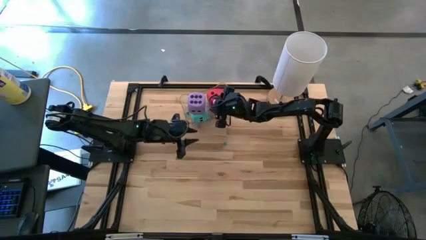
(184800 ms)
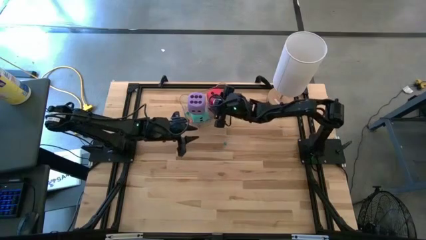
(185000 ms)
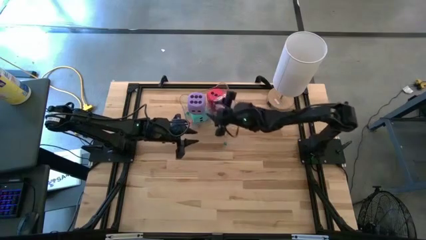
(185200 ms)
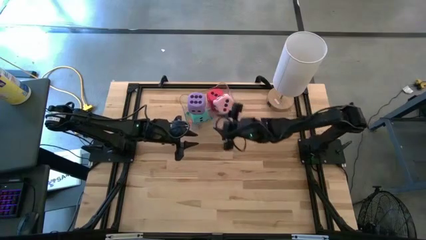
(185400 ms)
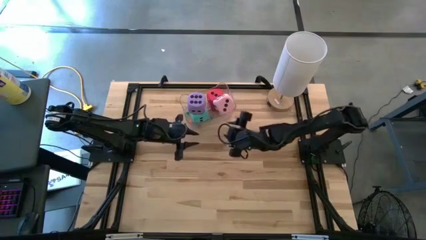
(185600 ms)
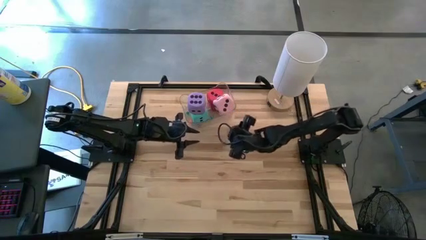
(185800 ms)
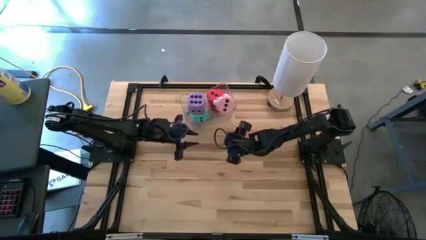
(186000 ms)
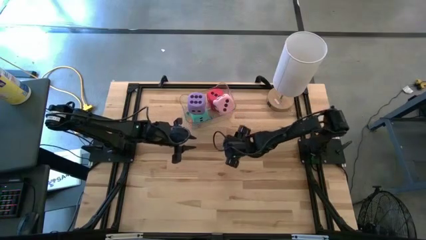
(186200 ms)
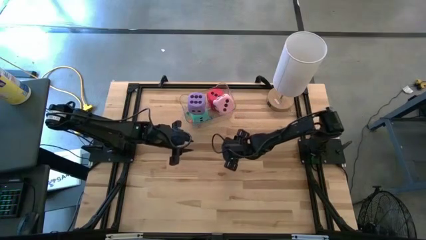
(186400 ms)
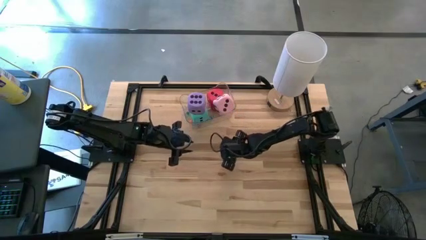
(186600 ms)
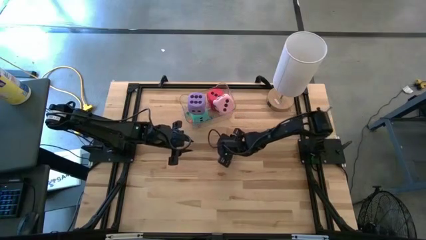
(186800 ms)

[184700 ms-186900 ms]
Task: Pick & Place Dice
Put the small light blue dice in the transparent bin

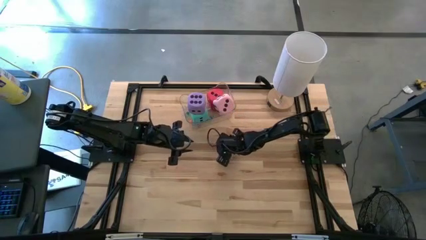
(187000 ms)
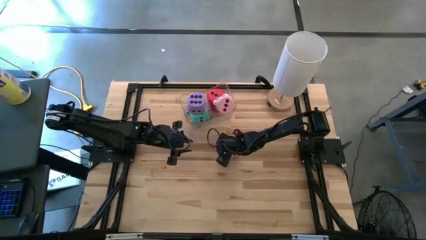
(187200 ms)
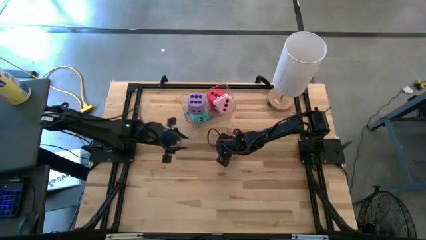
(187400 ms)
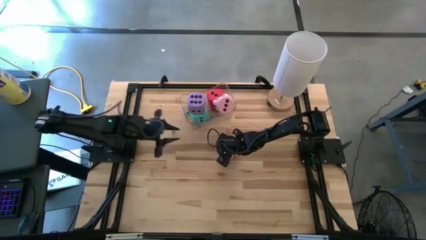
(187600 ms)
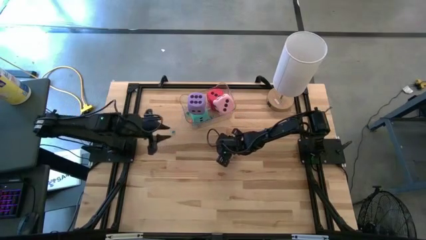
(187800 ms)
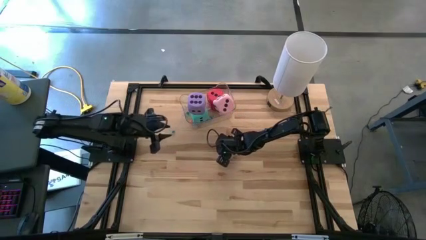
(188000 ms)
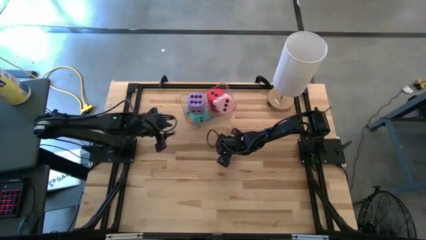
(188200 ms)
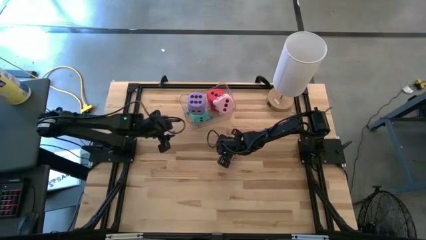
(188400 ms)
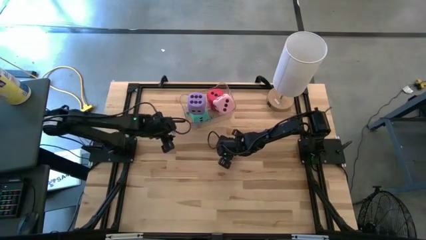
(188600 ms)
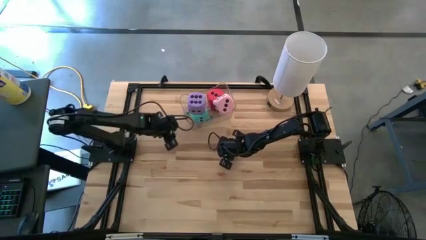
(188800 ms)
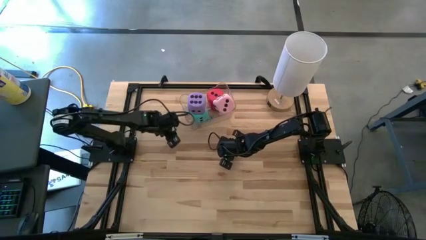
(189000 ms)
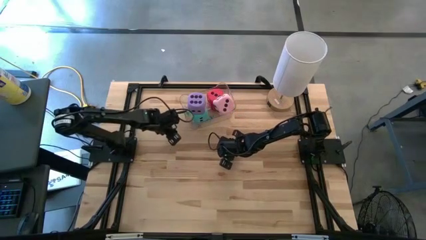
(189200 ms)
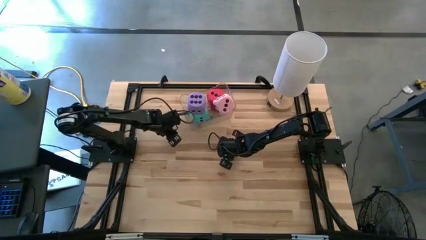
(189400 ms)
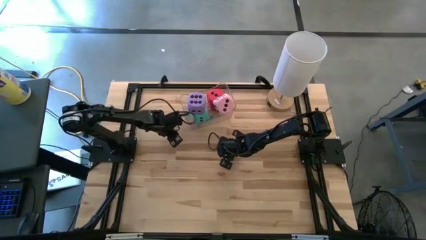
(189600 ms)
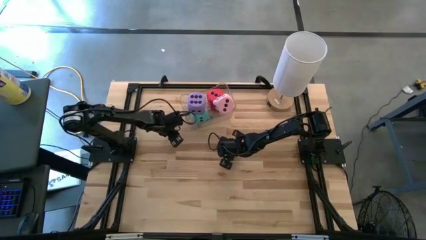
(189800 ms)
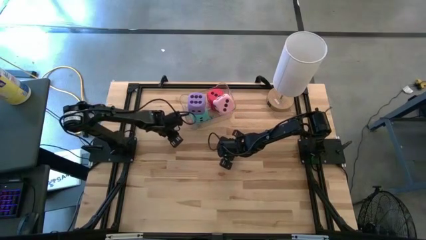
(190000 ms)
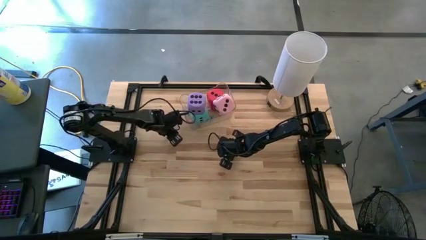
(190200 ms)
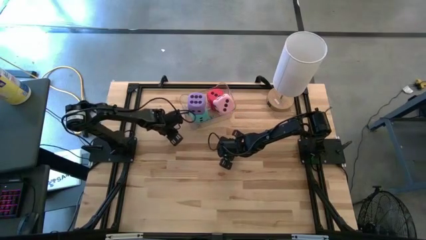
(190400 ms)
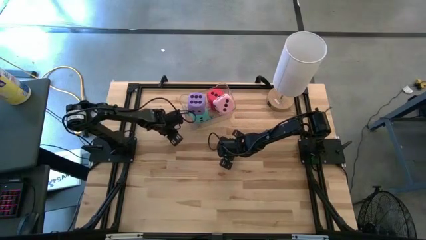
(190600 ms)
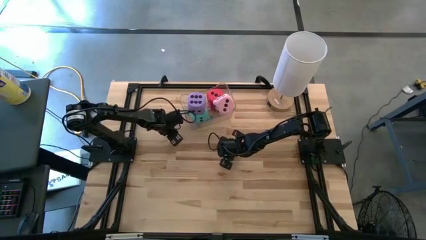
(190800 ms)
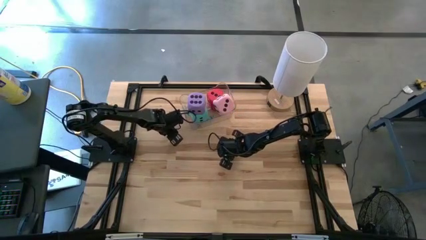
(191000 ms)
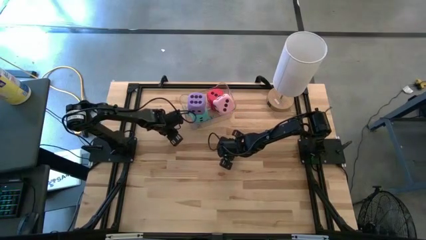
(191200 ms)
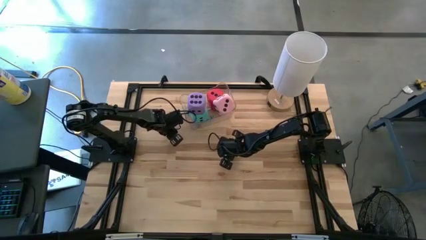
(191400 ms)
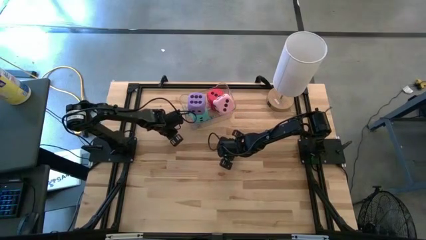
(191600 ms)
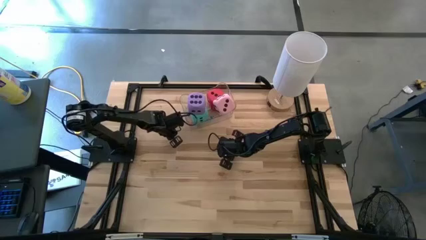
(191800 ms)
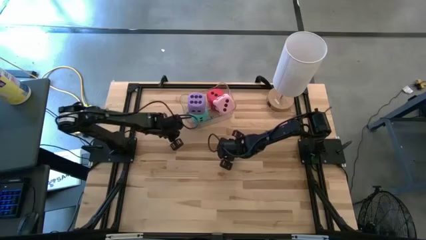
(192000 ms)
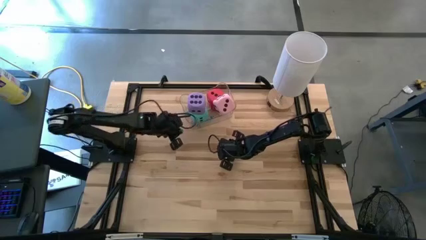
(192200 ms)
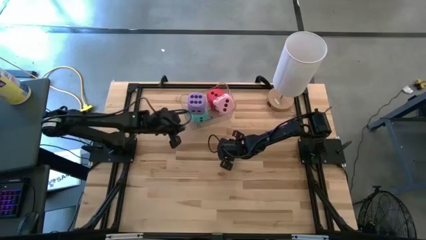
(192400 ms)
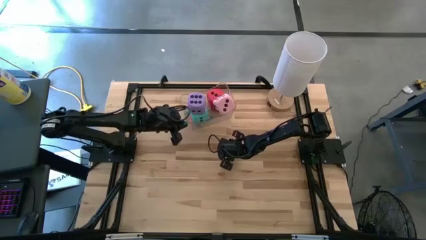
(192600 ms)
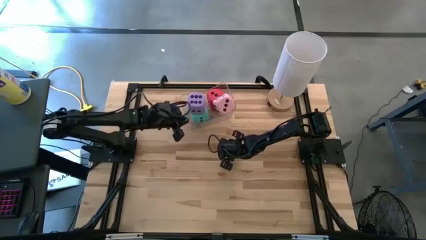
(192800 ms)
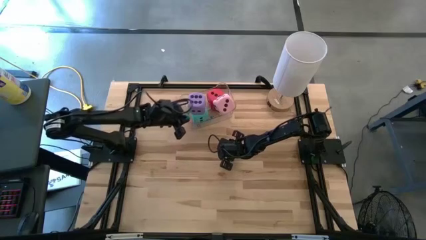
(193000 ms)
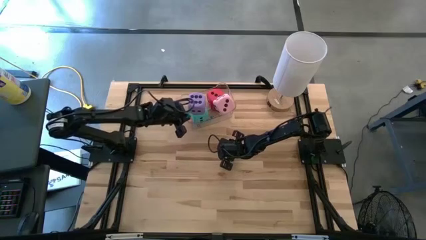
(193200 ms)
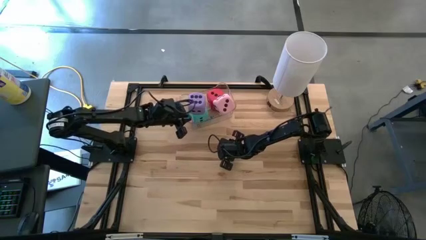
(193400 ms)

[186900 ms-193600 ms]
Put the small light blue dice in the transparent bin

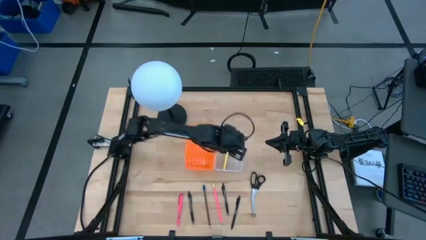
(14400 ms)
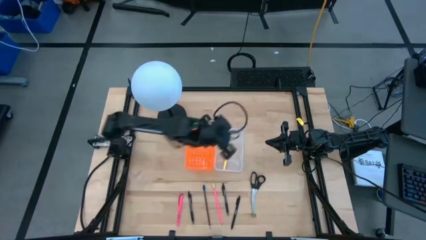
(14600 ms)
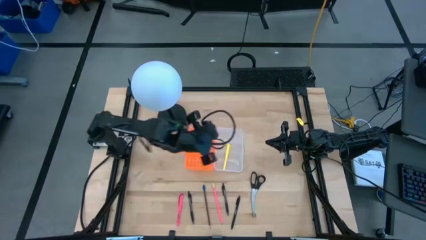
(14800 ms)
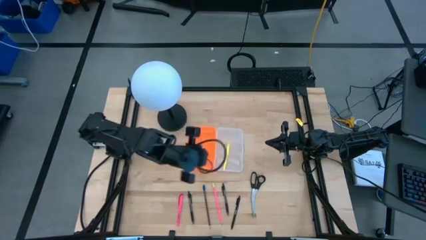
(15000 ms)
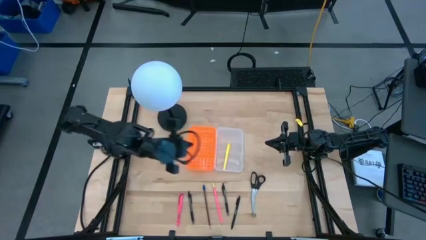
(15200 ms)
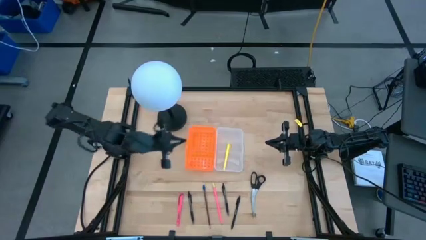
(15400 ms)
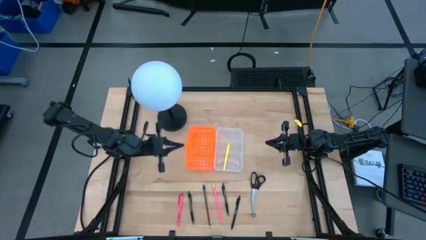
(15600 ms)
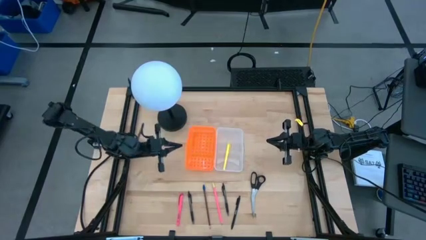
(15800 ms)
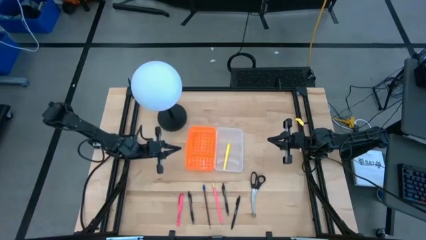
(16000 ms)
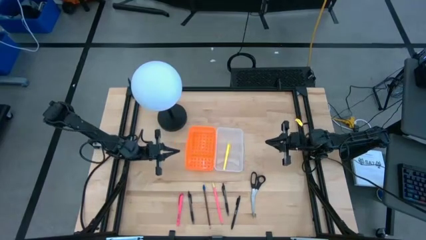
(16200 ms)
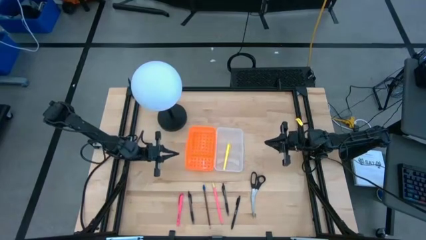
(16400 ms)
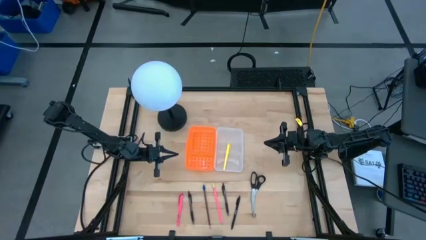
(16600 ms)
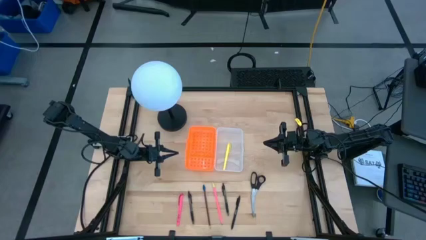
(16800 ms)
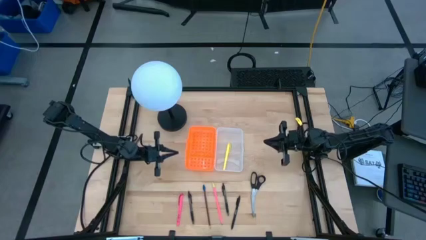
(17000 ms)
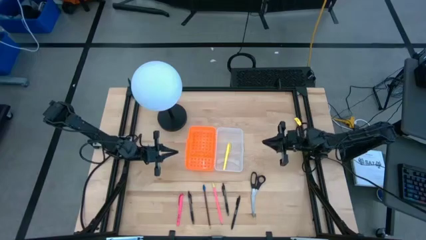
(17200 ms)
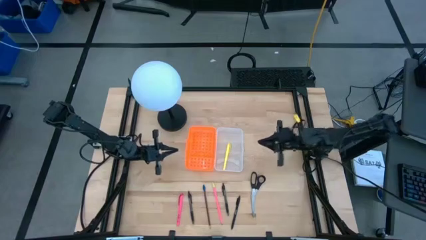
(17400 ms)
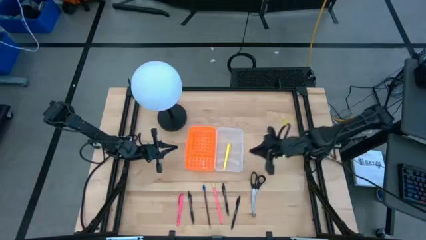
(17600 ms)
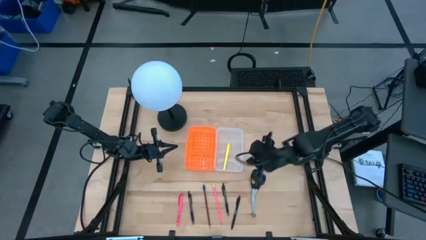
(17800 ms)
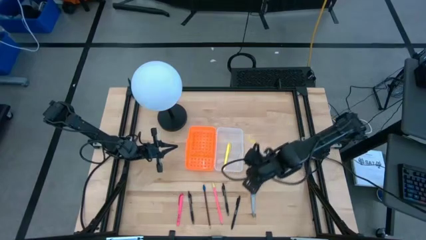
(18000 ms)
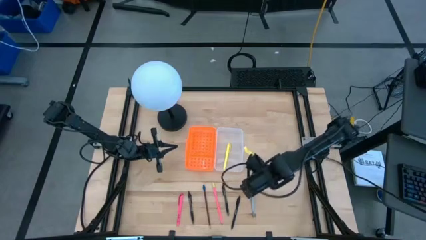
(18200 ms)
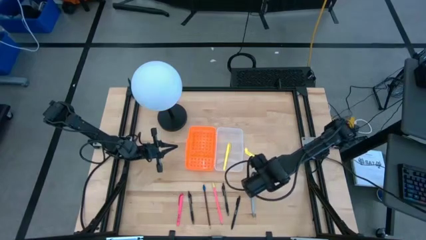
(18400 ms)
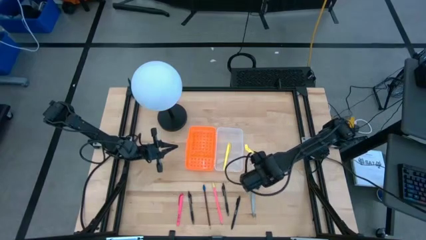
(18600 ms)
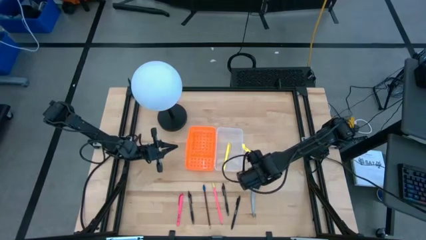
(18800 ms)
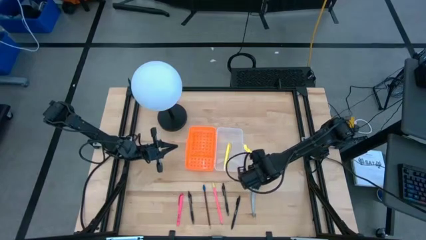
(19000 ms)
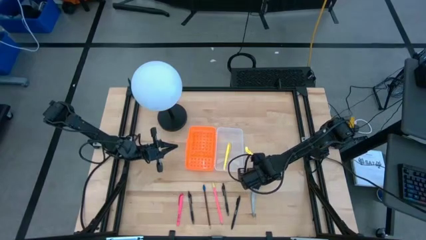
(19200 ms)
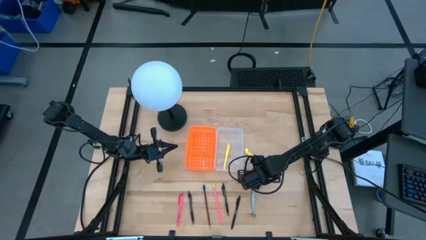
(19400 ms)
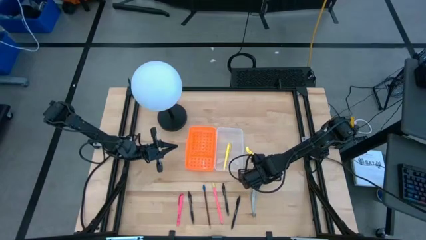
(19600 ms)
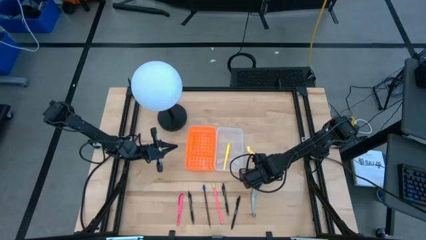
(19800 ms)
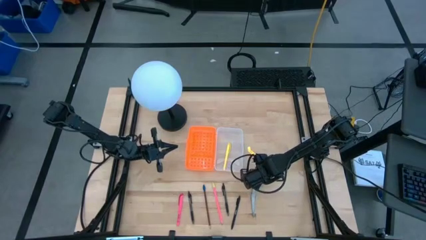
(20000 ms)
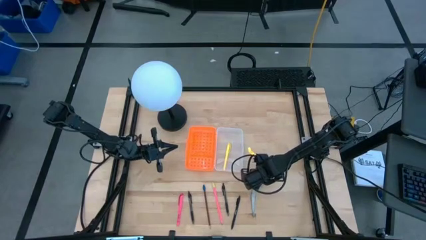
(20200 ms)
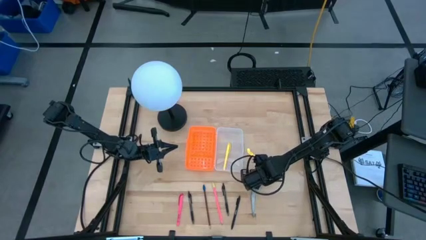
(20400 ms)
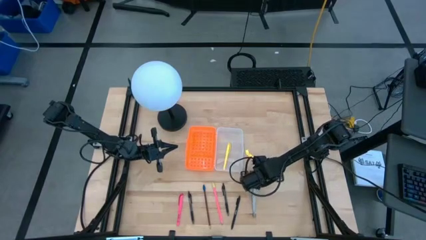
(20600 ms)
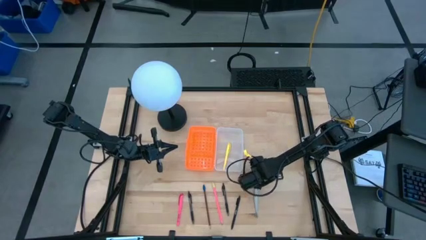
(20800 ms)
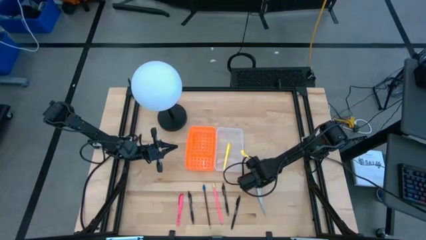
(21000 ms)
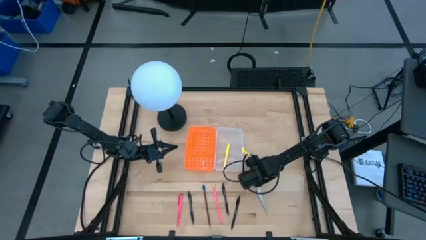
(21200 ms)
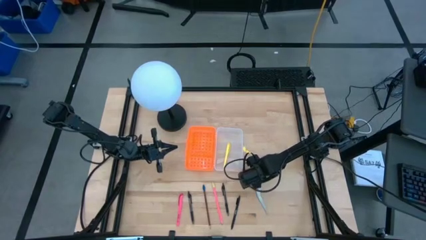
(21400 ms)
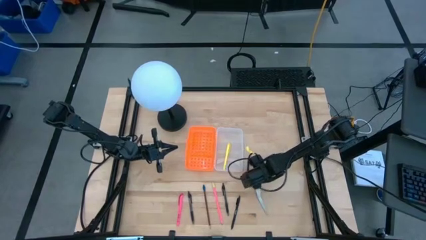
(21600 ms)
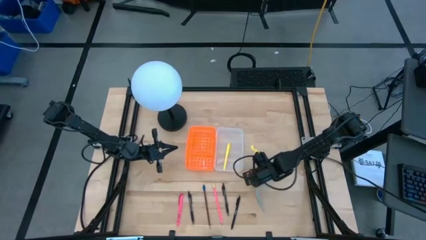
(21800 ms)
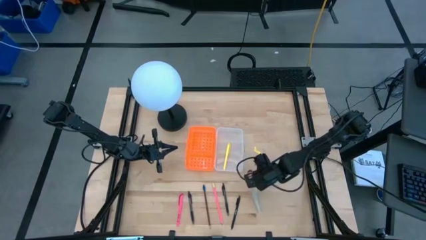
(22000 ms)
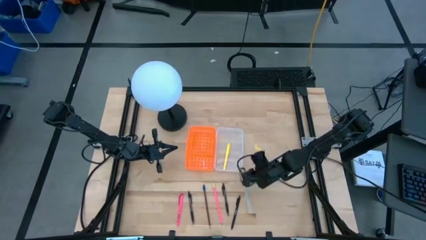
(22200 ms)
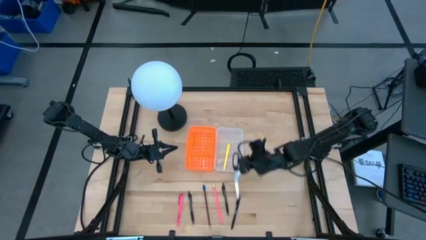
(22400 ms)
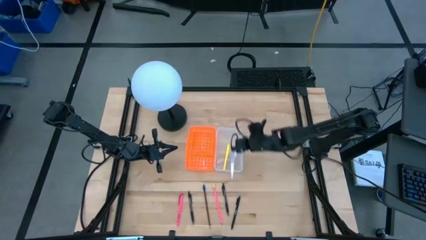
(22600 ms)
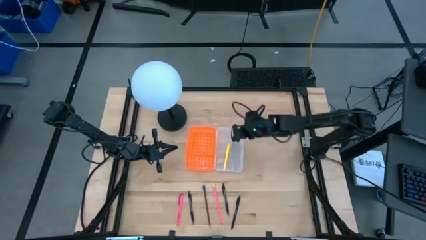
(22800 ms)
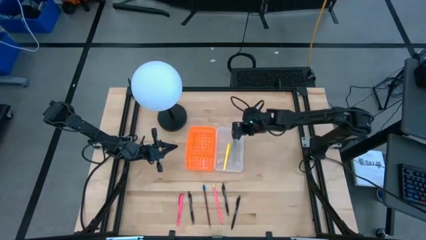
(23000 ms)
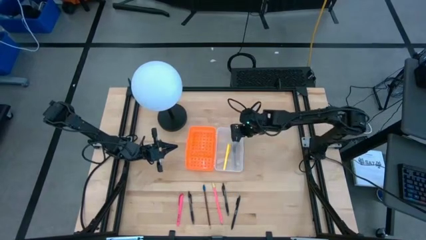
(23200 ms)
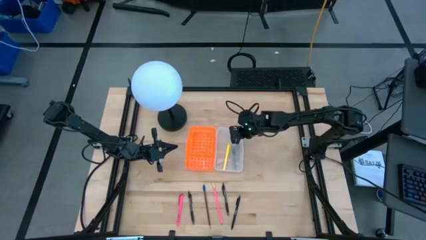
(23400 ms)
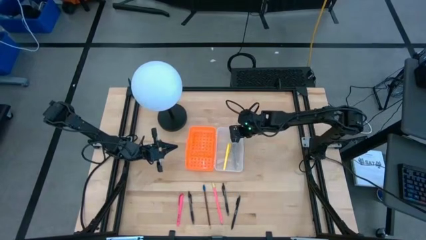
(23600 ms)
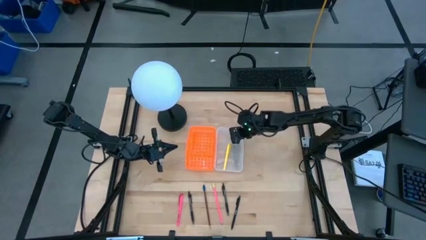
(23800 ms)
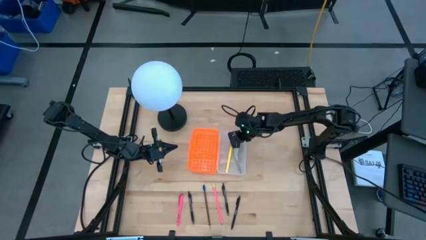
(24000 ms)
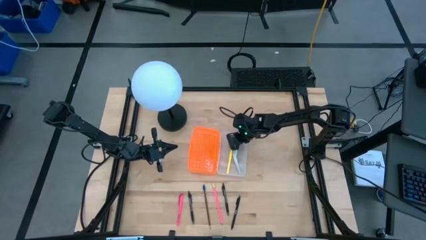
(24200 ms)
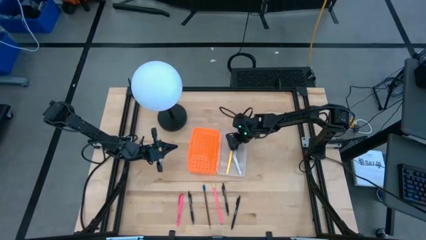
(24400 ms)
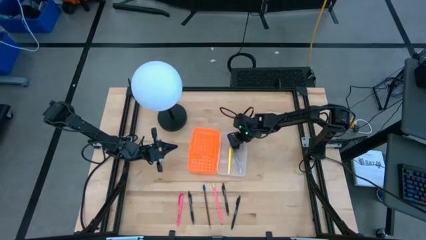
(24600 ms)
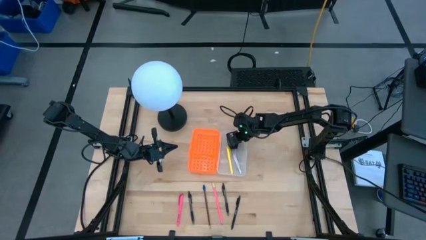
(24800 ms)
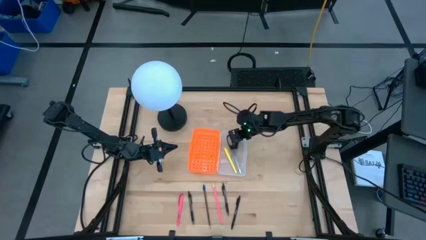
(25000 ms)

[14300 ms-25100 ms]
Task: Pick & place school supplies into a supply box
Put the black scissors into the orange supply box
